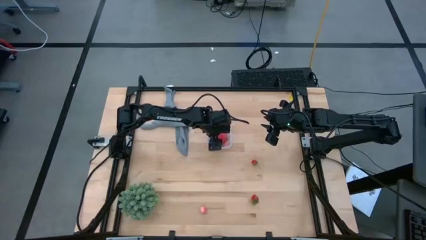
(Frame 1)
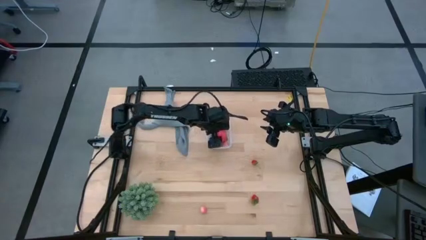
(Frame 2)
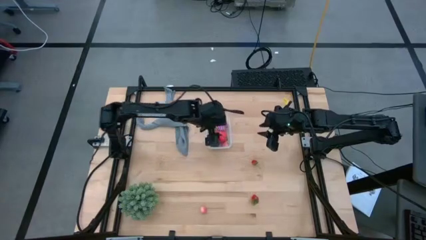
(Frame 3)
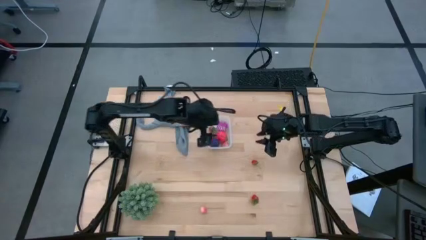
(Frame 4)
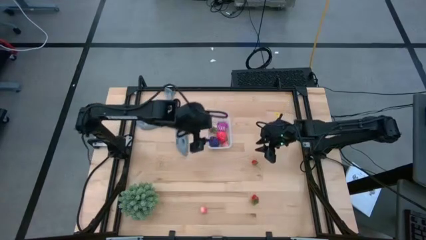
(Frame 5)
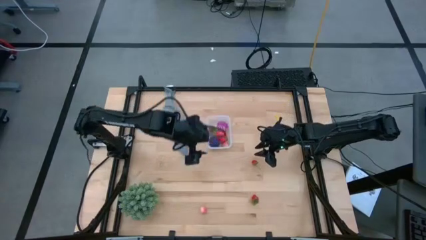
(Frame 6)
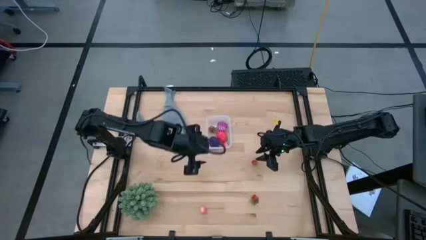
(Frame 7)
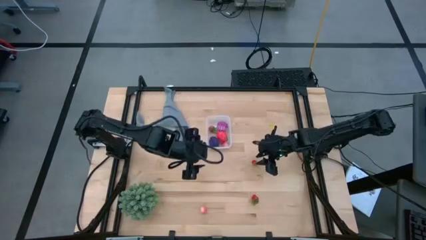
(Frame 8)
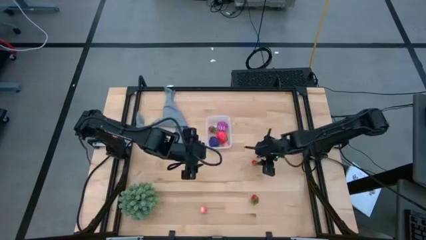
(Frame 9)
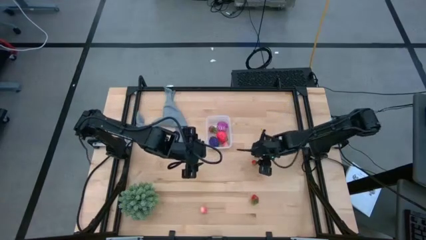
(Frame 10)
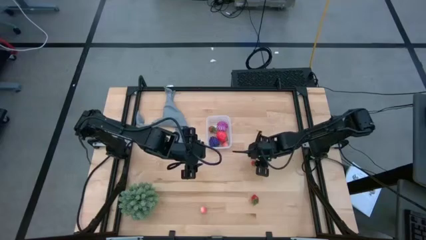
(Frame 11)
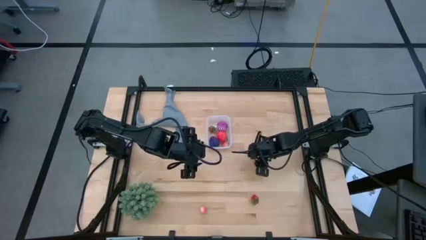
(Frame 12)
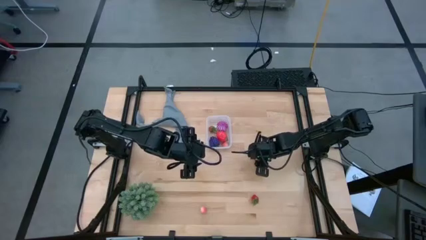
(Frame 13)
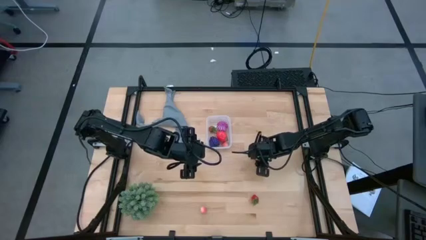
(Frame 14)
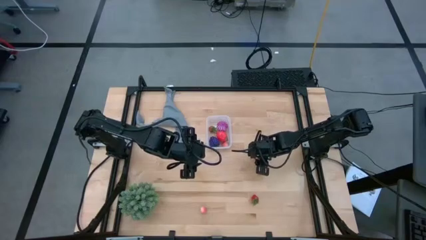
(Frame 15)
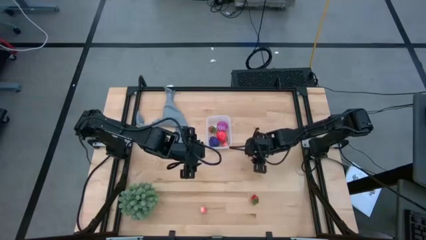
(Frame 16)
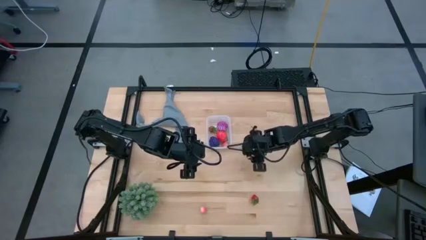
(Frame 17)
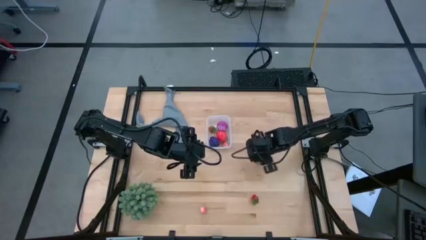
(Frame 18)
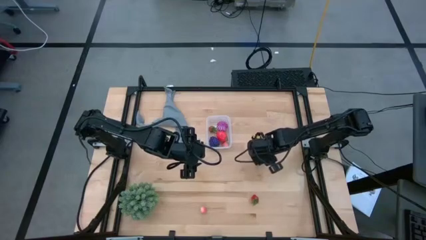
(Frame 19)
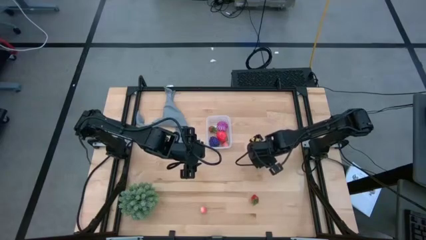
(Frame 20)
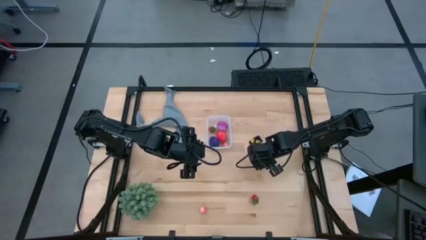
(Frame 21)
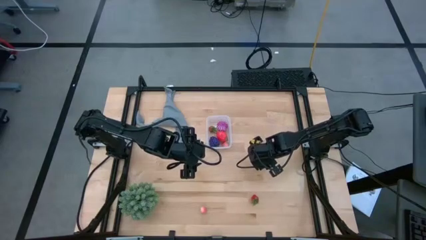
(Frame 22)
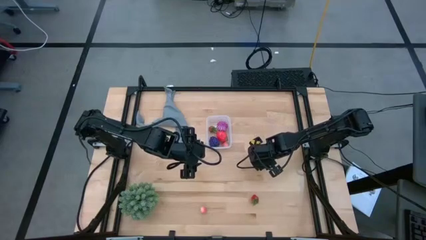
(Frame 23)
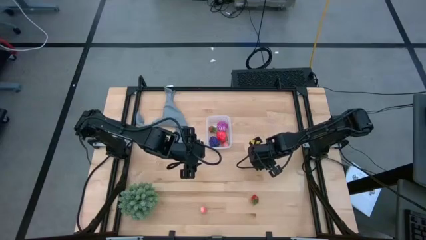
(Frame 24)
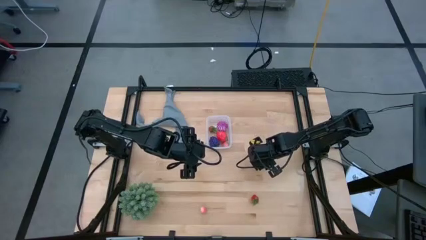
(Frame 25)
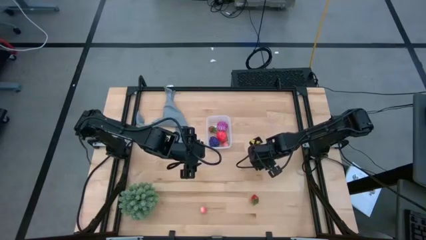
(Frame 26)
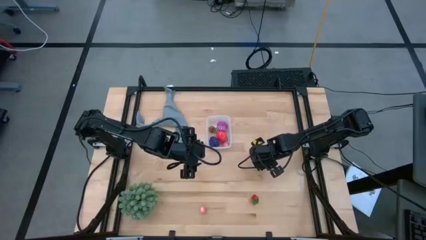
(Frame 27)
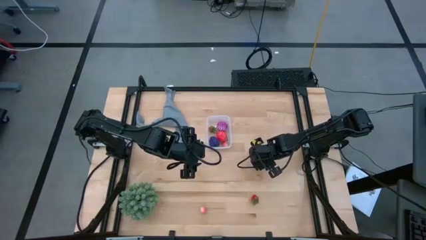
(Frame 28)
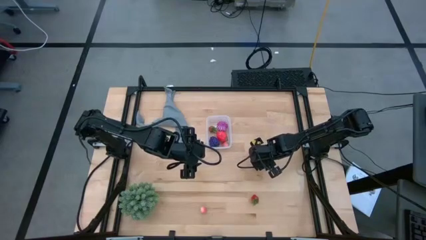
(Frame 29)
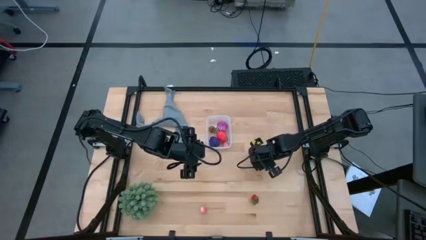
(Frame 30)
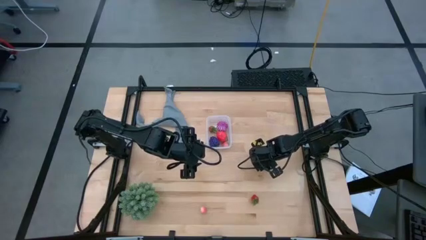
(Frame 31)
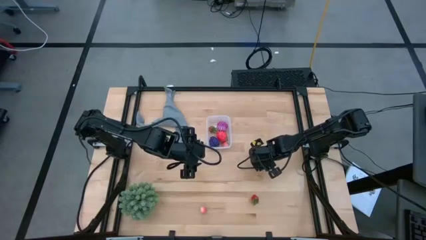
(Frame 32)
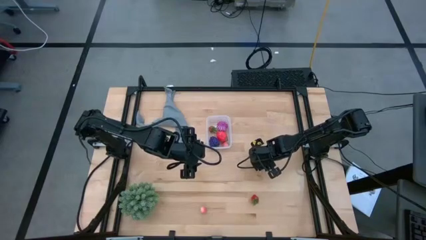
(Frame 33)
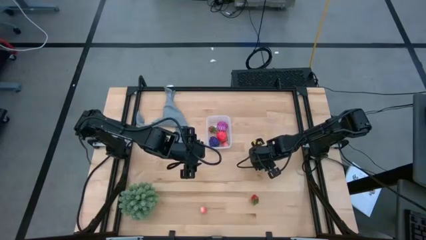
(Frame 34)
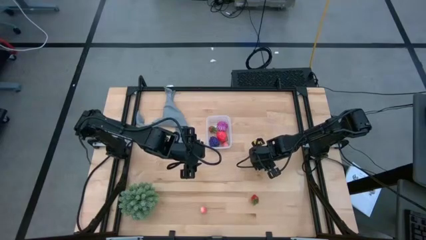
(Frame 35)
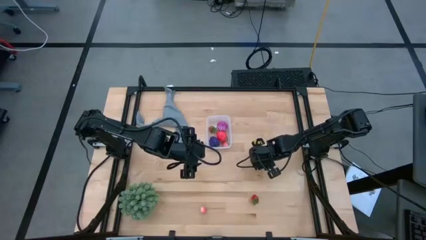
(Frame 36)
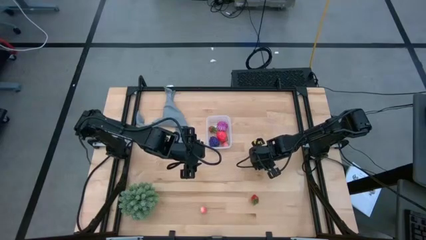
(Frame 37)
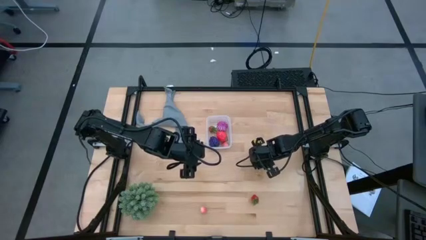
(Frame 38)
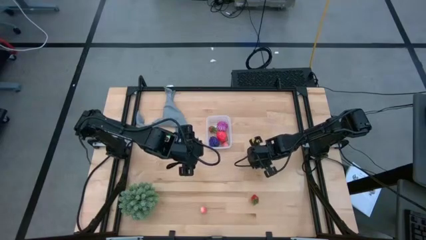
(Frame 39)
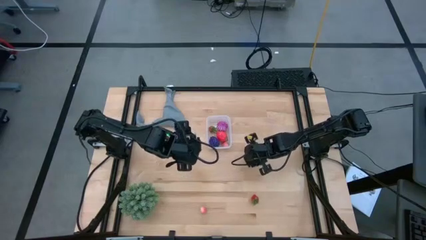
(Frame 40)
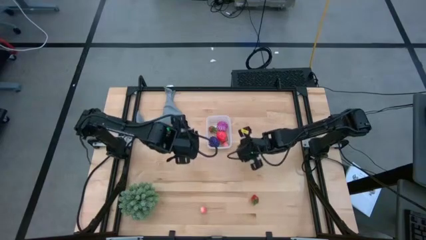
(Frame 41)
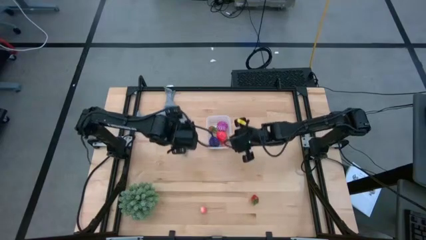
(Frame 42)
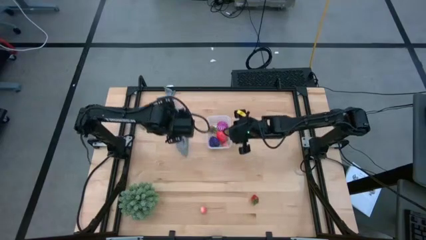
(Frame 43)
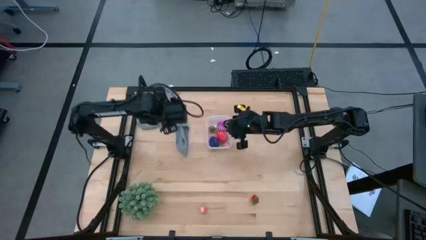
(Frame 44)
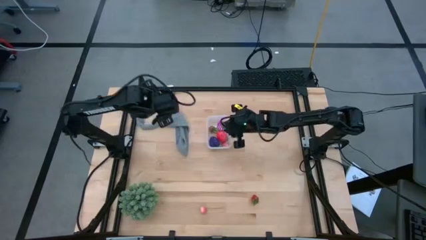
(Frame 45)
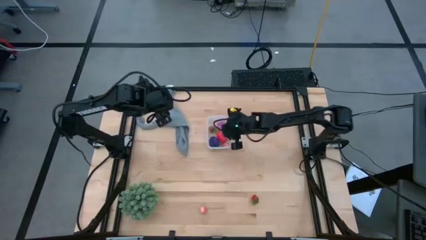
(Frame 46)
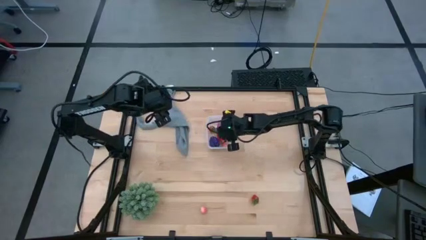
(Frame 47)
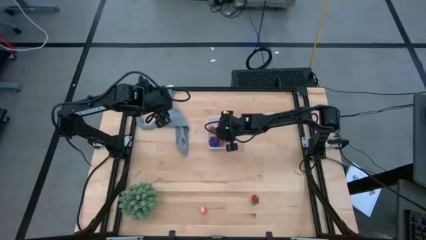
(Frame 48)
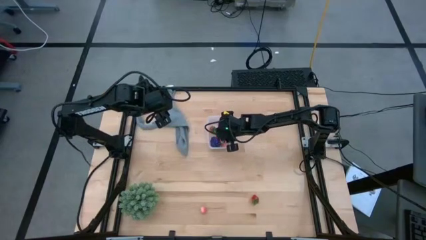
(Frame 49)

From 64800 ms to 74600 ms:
Task: Pick and placing Produce into tupperware
Put the top red strawberry into the transparent bin

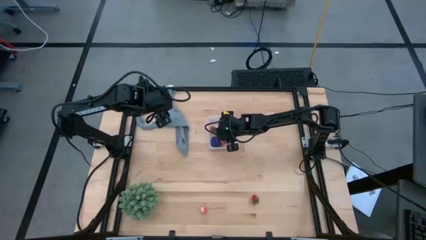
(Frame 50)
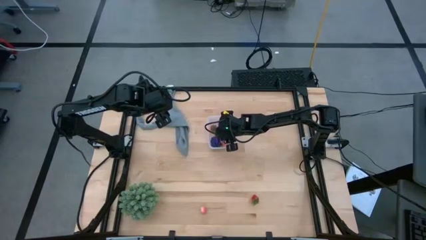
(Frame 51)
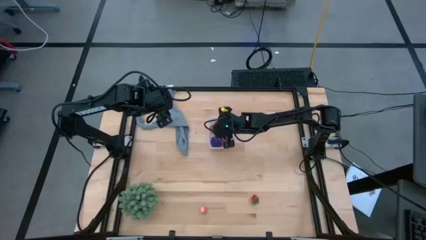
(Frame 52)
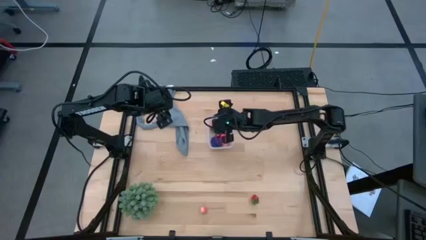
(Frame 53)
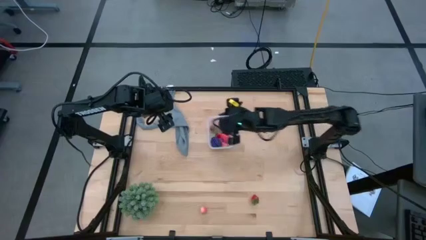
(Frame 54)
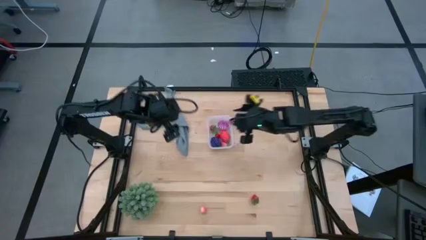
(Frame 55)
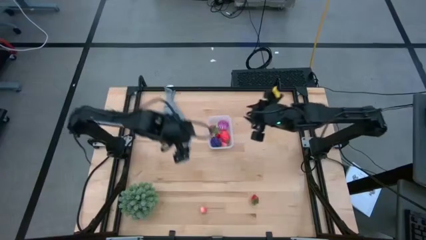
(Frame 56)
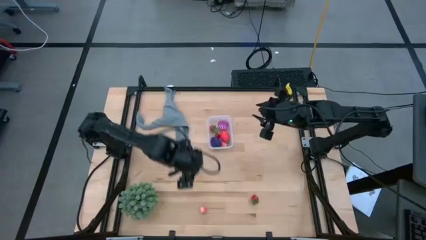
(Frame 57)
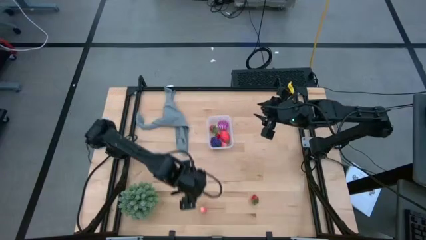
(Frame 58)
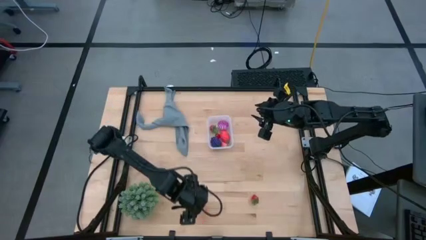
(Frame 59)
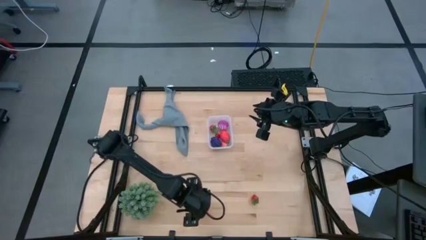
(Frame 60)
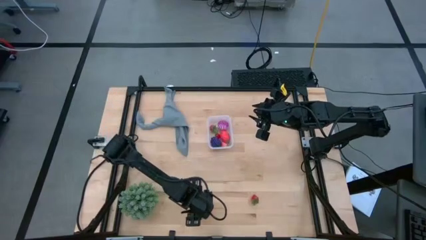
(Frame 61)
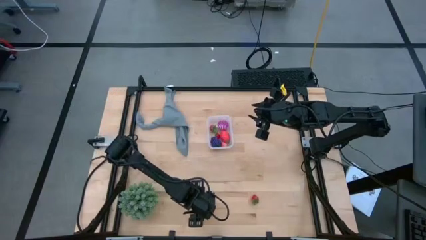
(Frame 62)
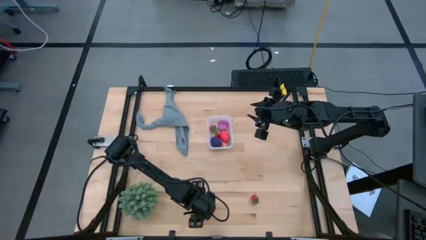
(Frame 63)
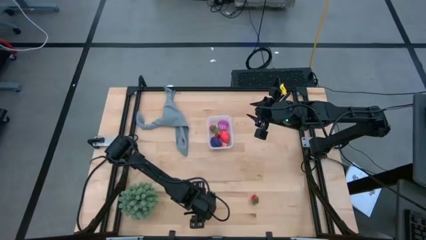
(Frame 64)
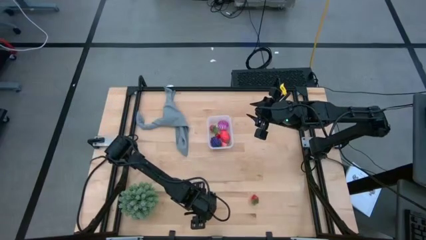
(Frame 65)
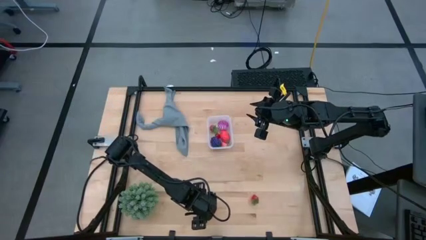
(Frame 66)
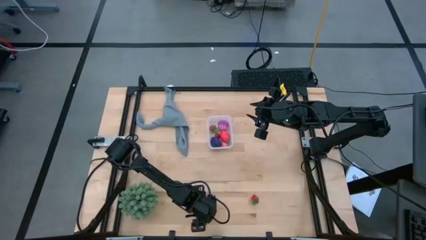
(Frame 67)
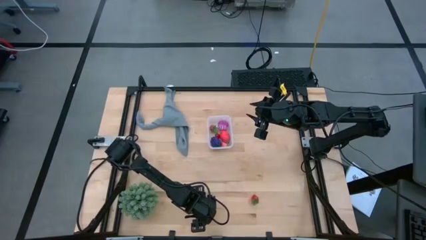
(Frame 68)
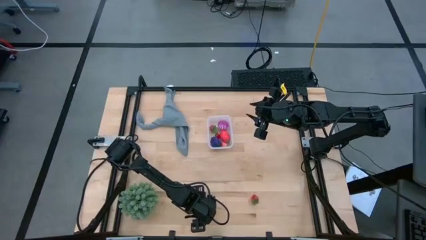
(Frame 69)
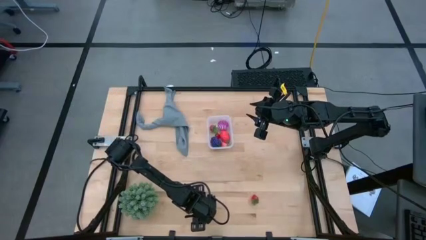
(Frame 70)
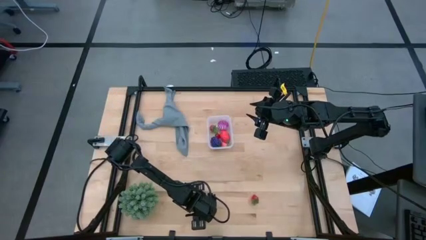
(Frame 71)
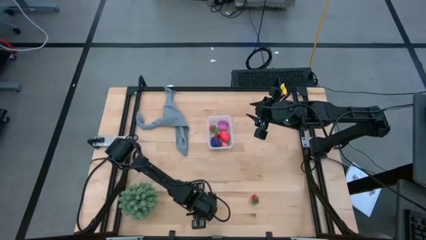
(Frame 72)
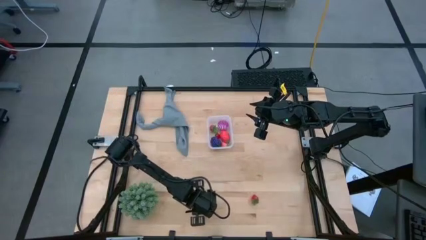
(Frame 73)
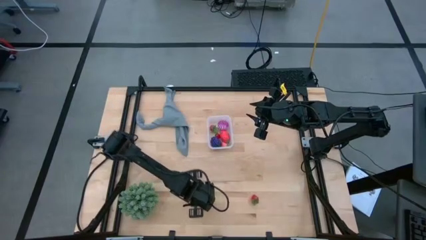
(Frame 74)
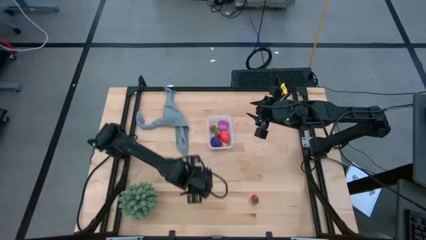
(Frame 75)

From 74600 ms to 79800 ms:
Put the pink peach into the transparent bin
